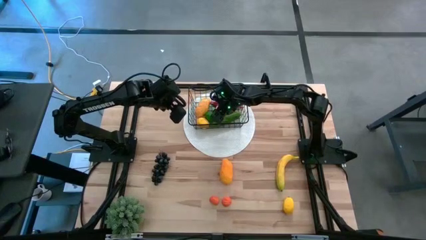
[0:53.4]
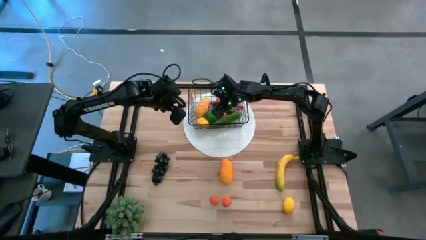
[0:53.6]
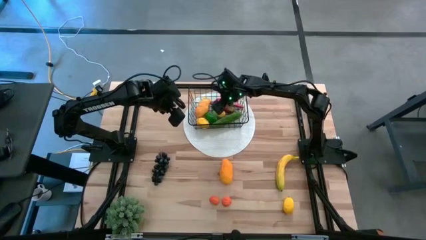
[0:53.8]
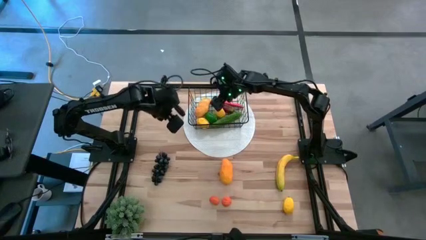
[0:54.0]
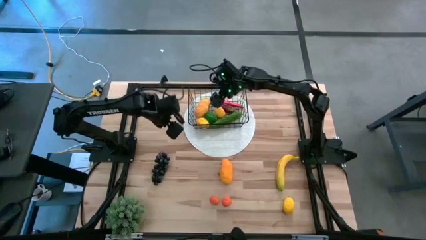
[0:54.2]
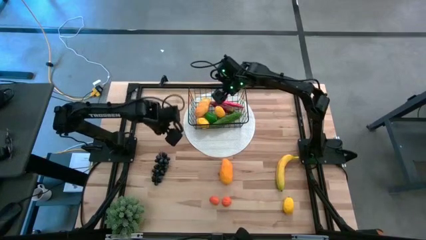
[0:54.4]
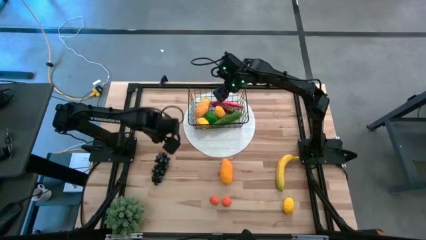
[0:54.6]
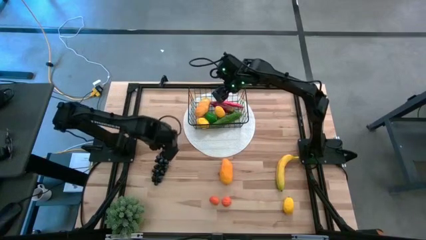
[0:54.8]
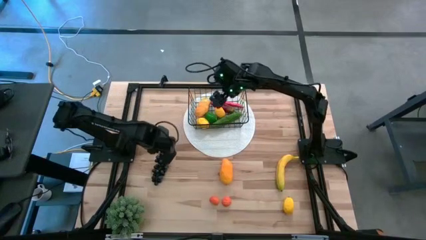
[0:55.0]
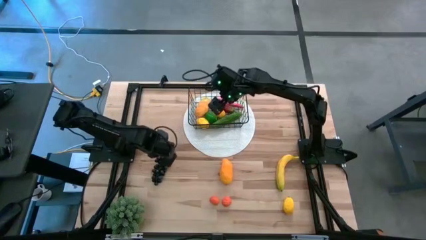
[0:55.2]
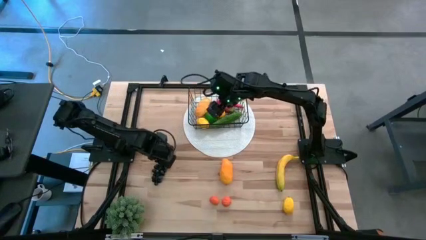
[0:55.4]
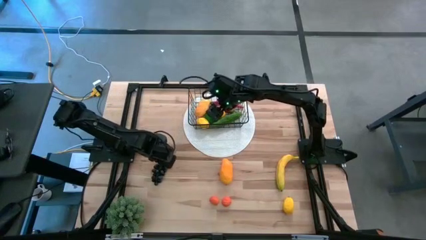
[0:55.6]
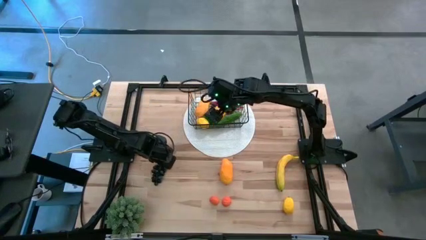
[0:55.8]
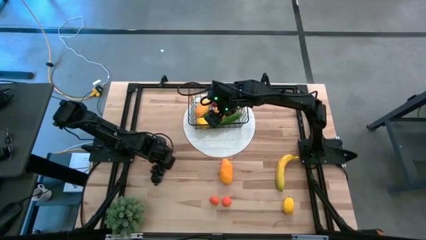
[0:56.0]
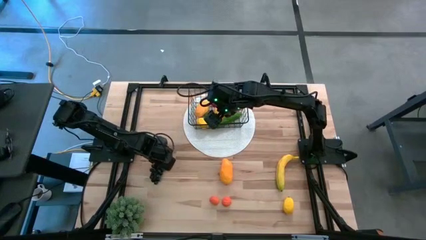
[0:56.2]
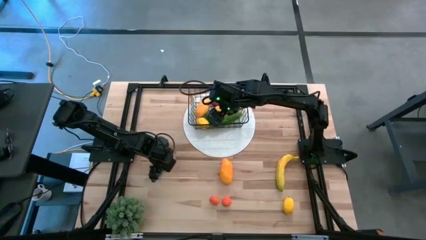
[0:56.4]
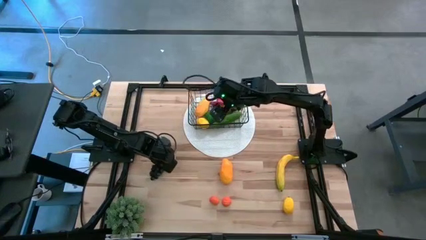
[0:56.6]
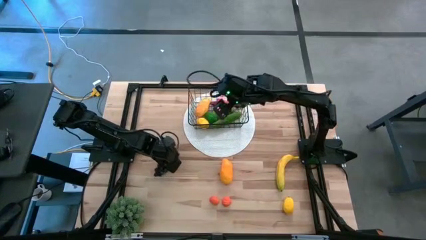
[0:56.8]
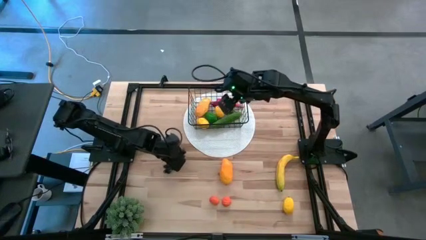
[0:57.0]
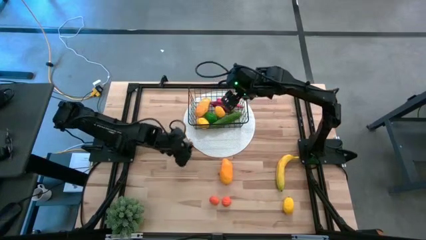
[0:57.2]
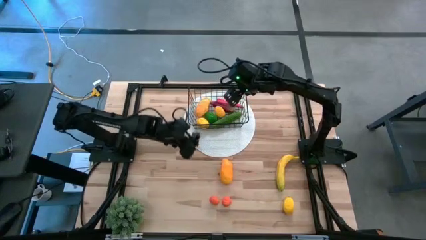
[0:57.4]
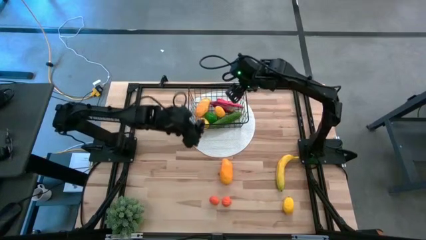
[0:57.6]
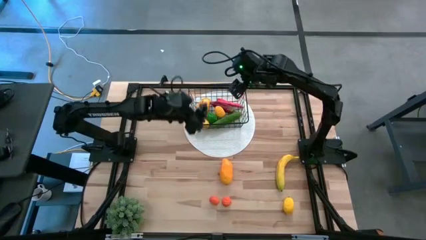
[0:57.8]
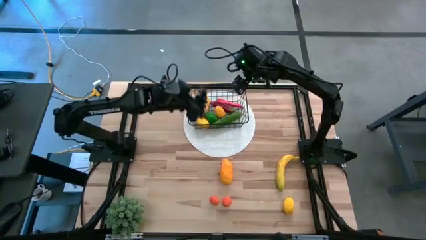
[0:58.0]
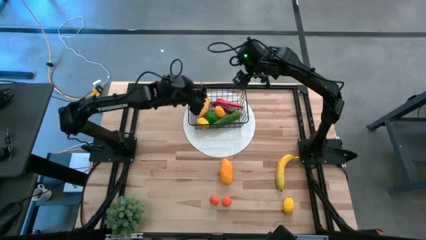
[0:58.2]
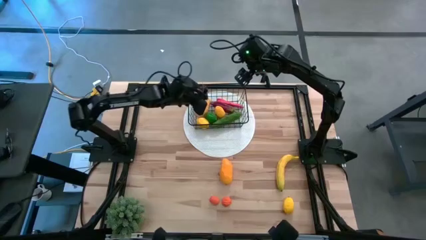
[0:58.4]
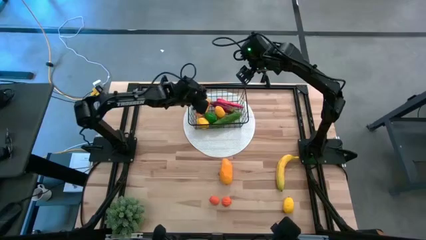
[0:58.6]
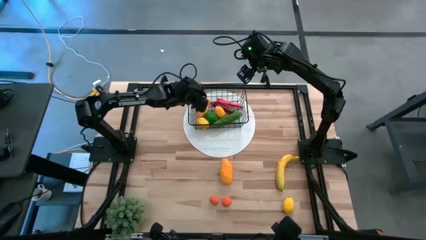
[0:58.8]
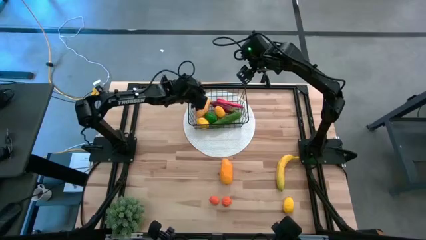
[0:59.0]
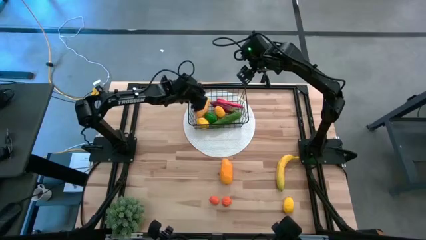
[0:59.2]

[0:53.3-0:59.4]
Task: Build produce basket
Put the grapes into the black basket

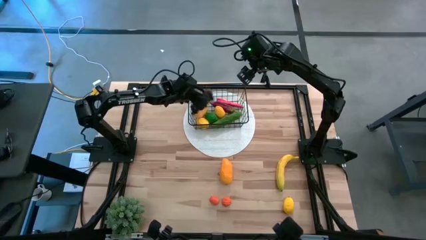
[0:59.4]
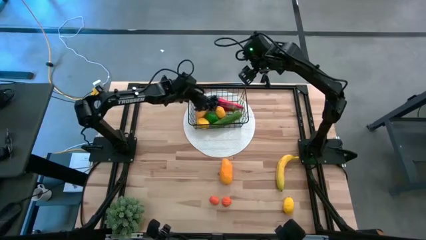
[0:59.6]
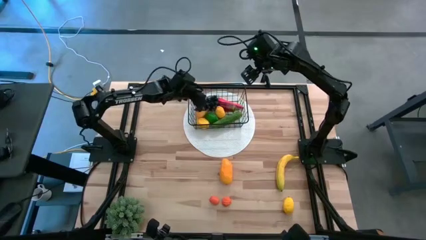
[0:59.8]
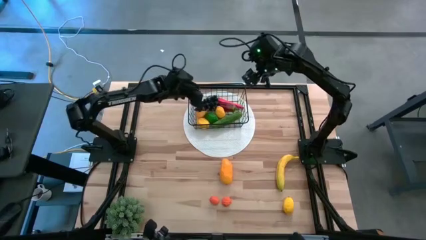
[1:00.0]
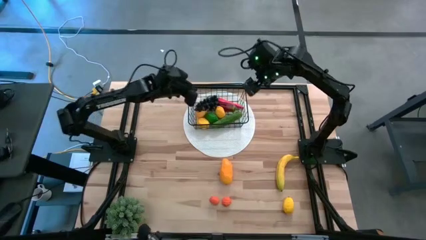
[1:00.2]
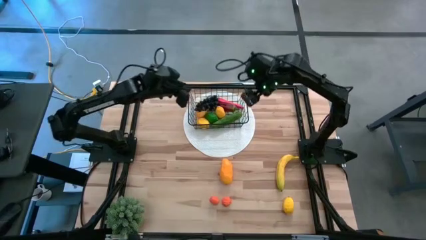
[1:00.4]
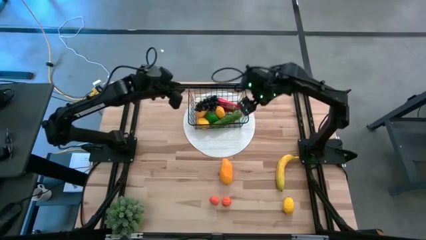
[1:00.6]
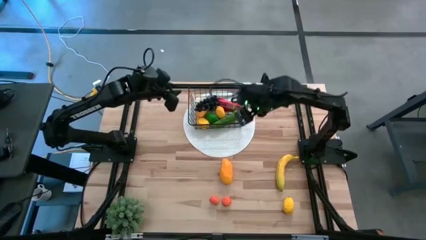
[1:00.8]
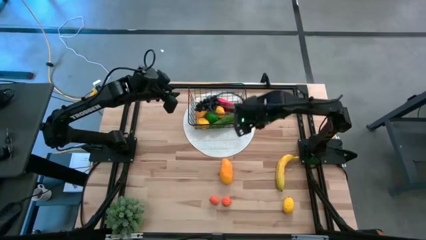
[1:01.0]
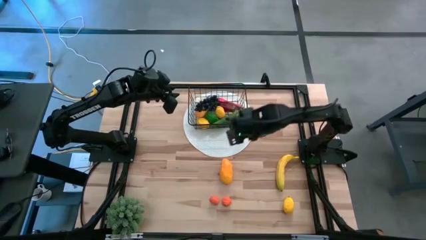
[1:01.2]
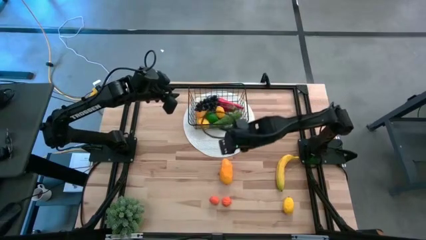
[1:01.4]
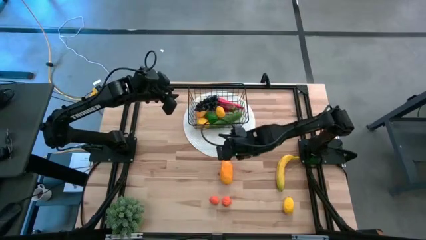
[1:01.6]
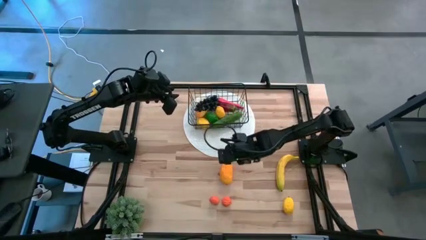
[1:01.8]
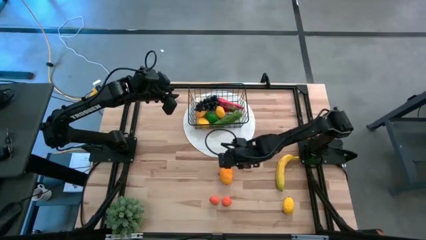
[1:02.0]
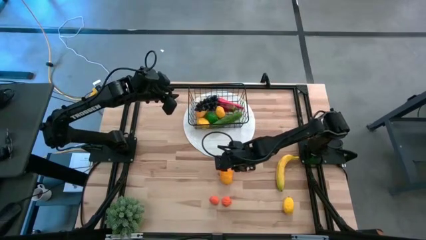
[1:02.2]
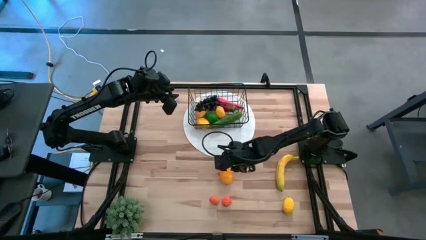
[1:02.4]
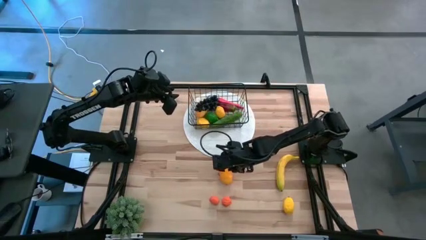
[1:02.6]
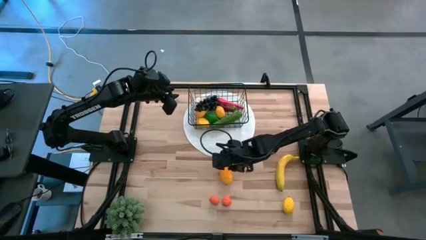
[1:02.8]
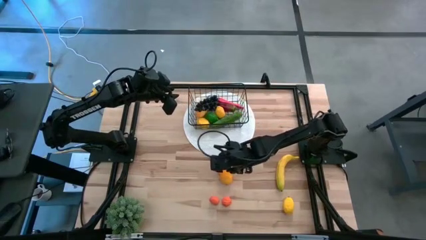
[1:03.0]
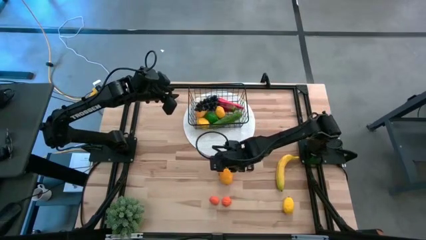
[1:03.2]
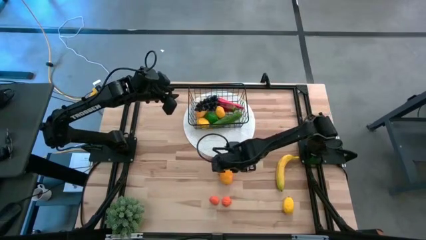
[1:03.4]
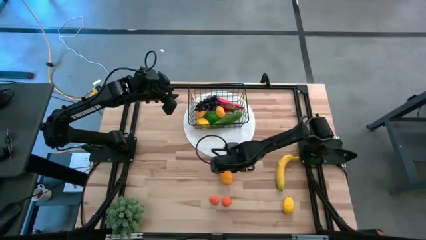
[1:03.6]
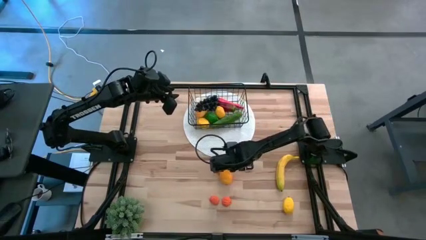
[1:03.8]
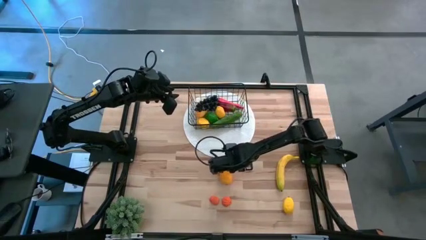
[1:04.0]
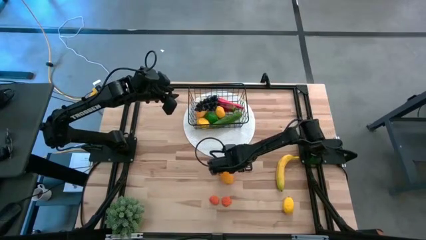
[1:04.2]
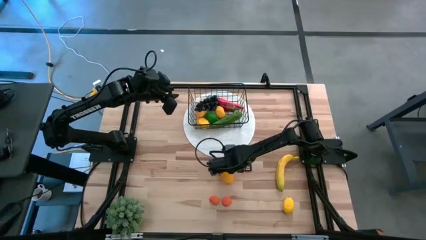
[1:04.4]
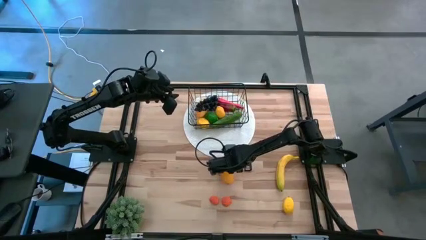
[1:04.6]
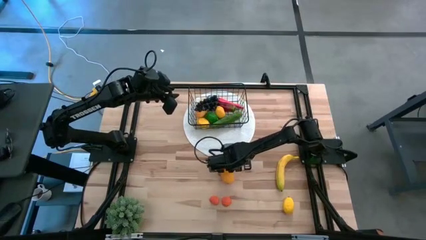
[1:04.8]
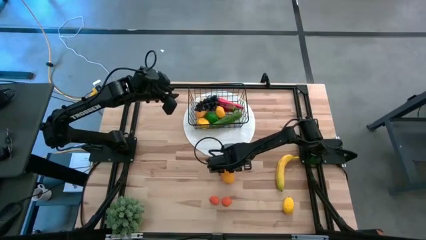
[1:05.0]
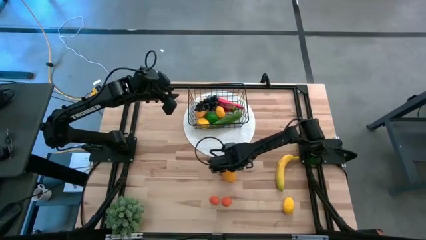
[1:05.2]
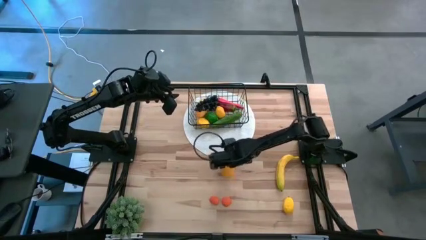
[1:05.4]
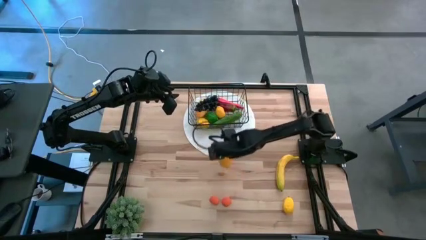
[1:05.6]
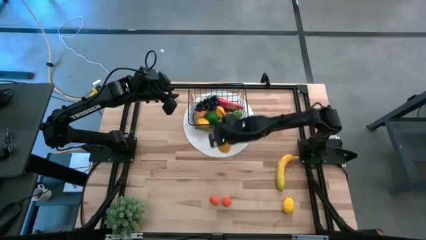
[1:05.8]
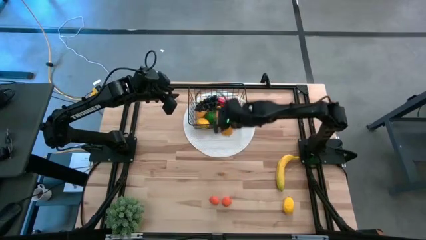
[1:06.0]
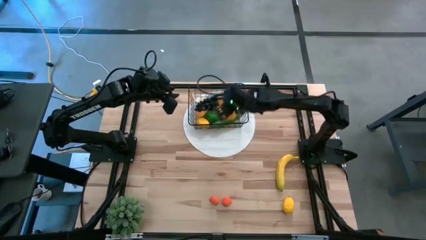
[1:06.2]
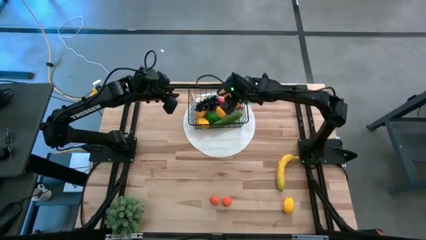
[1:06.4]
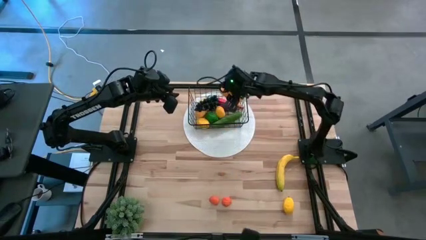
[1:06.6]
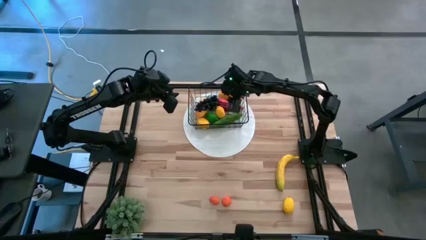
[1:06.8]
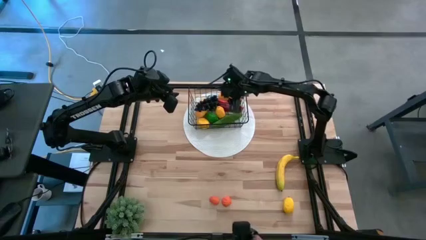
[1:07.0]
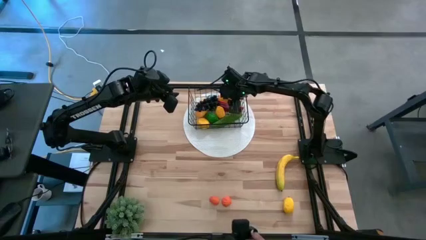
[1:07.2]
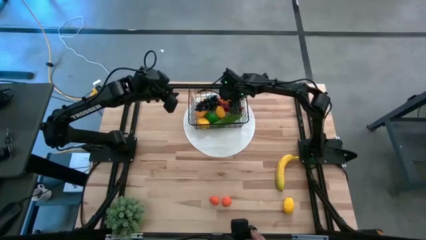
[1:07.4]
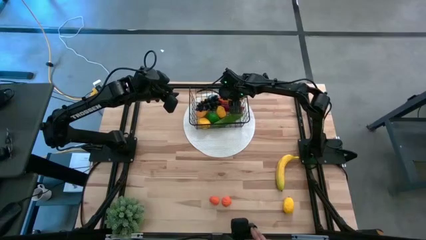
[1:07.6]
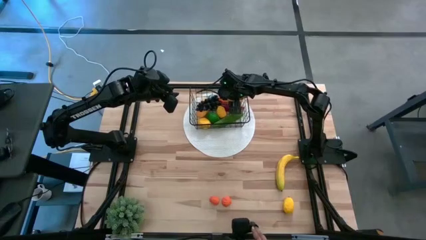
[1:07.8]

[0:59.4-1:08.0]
Put the mango into the black basket
